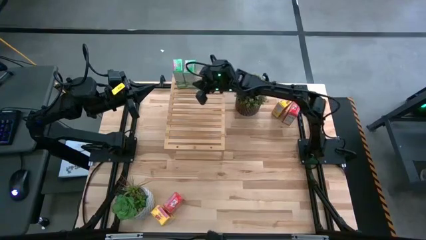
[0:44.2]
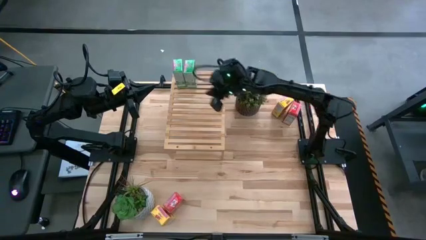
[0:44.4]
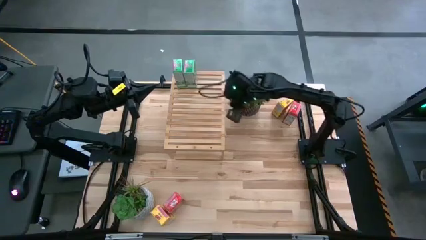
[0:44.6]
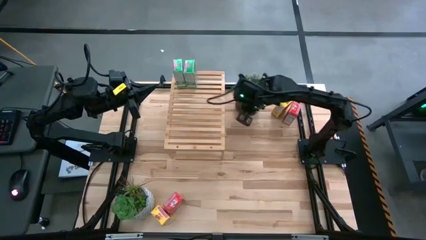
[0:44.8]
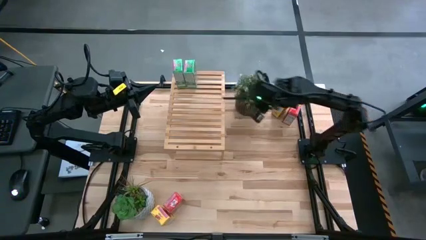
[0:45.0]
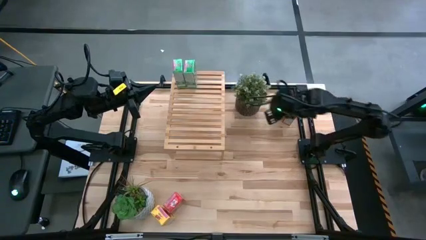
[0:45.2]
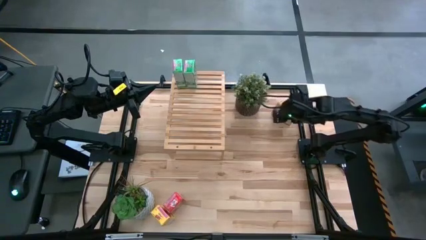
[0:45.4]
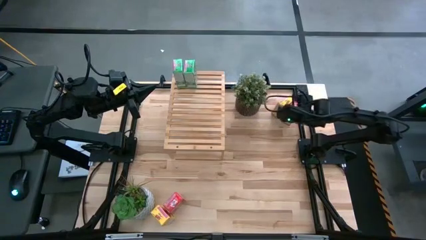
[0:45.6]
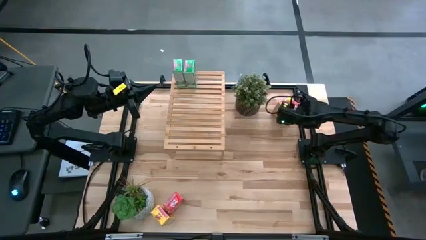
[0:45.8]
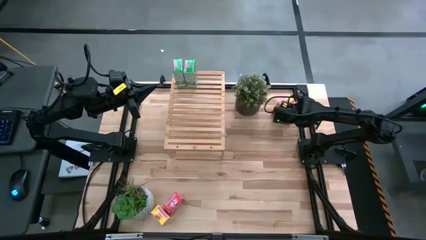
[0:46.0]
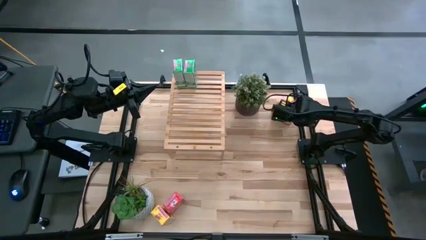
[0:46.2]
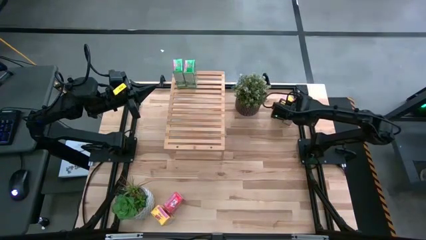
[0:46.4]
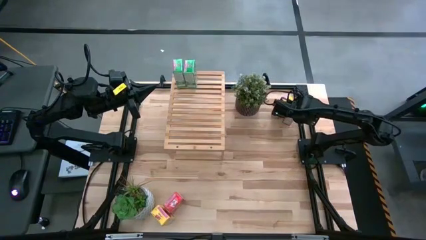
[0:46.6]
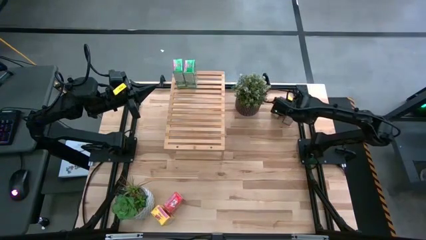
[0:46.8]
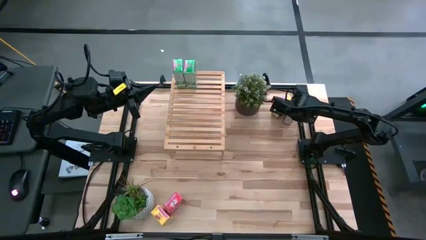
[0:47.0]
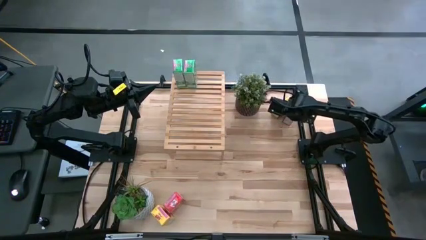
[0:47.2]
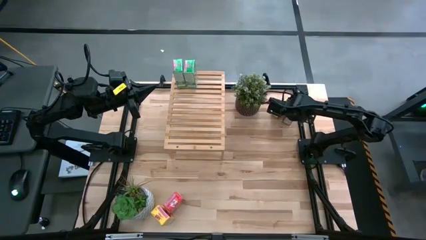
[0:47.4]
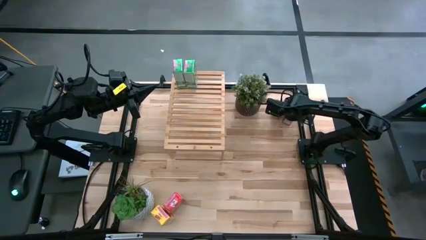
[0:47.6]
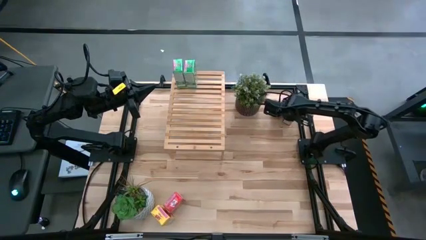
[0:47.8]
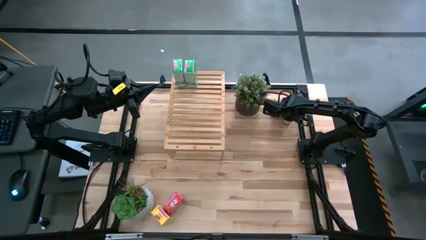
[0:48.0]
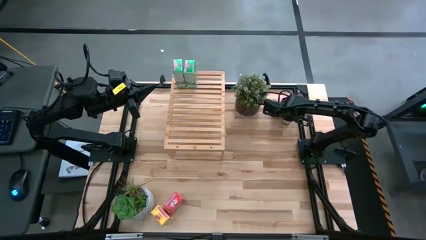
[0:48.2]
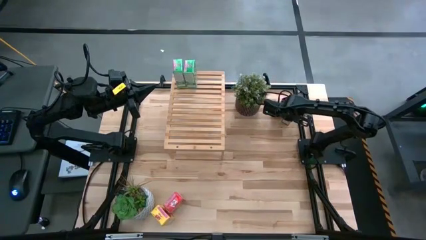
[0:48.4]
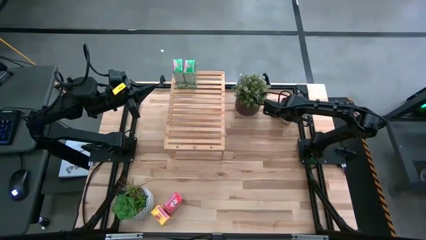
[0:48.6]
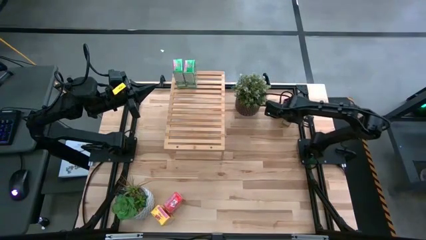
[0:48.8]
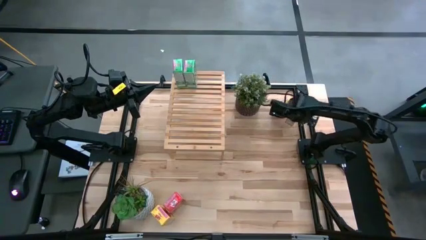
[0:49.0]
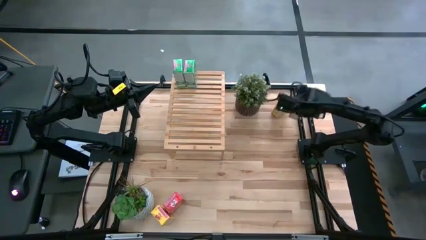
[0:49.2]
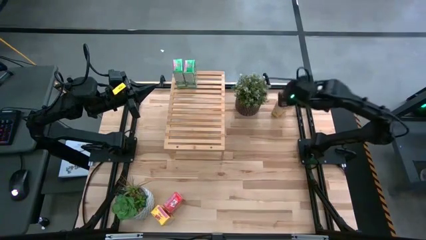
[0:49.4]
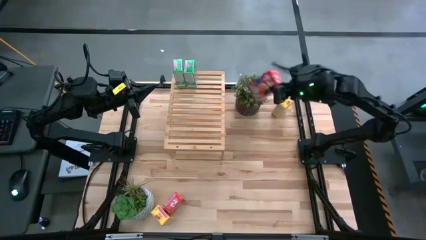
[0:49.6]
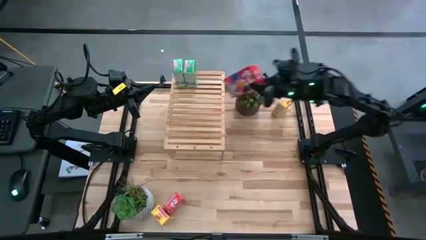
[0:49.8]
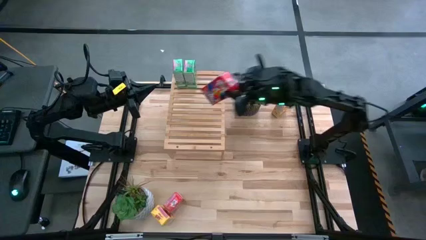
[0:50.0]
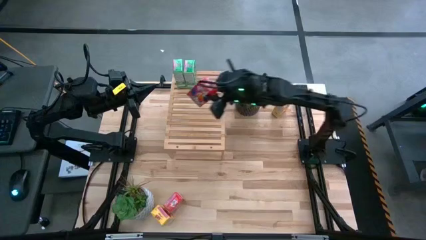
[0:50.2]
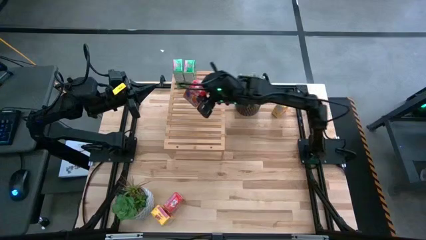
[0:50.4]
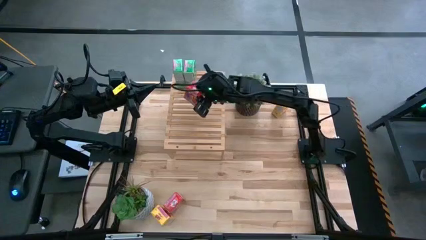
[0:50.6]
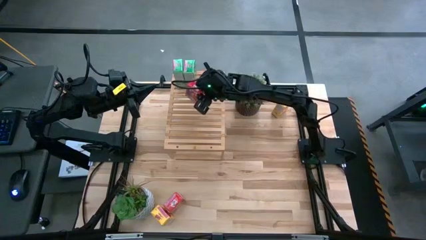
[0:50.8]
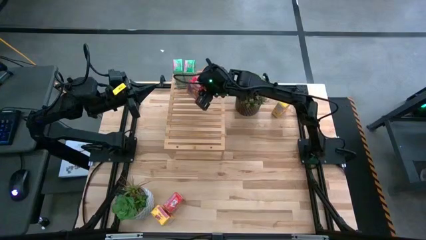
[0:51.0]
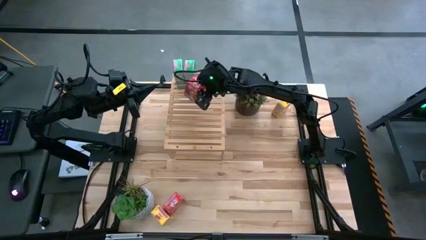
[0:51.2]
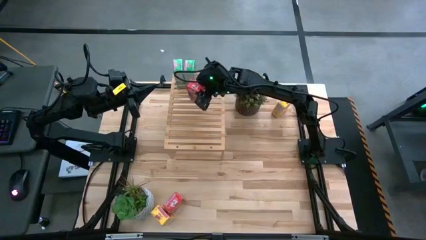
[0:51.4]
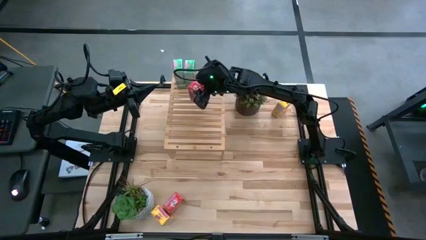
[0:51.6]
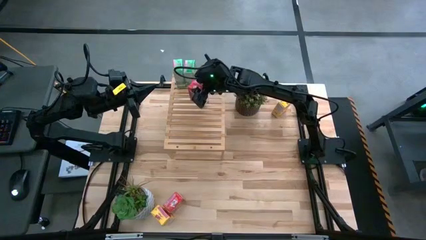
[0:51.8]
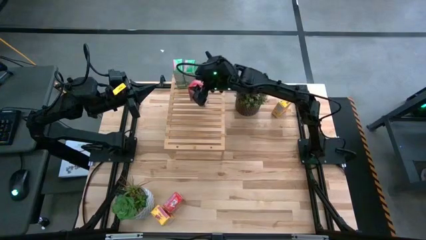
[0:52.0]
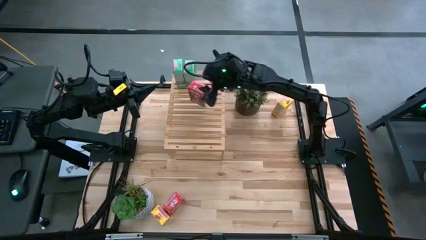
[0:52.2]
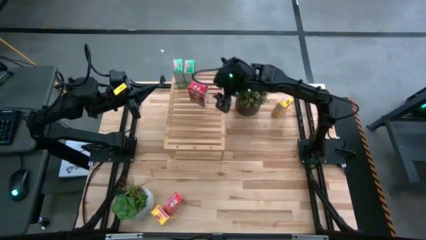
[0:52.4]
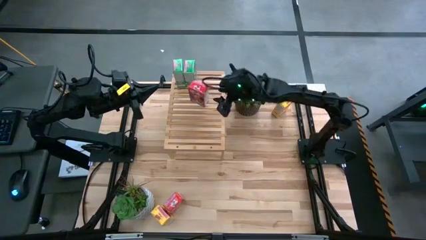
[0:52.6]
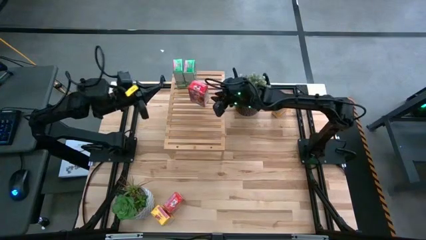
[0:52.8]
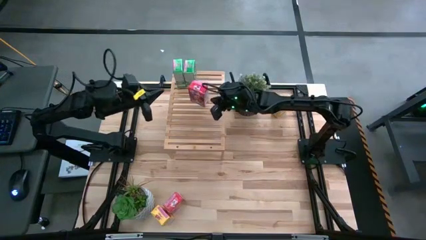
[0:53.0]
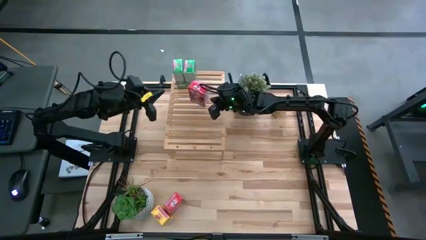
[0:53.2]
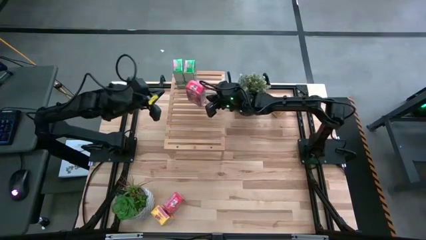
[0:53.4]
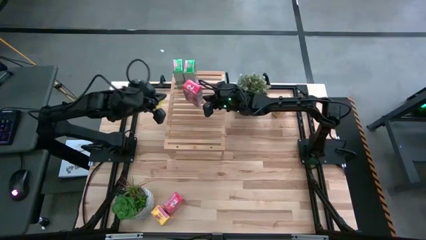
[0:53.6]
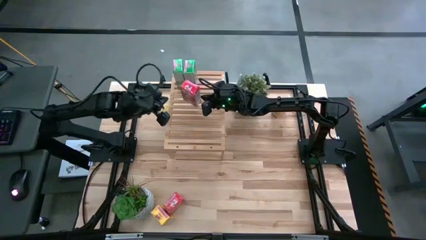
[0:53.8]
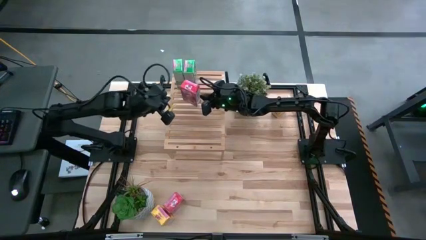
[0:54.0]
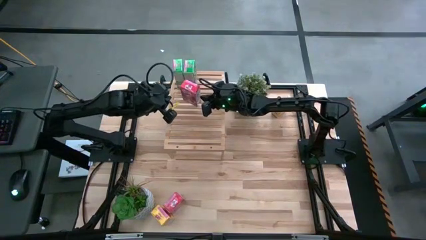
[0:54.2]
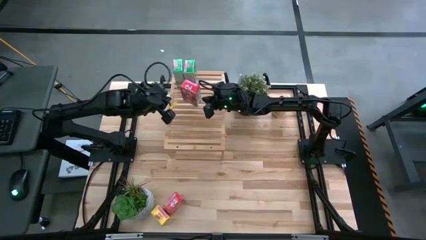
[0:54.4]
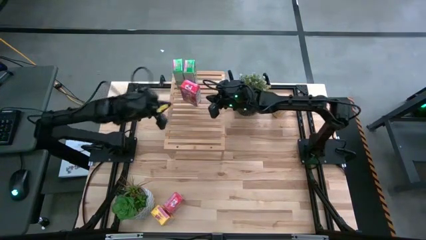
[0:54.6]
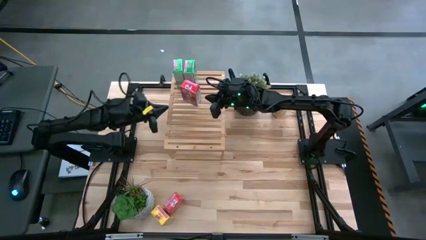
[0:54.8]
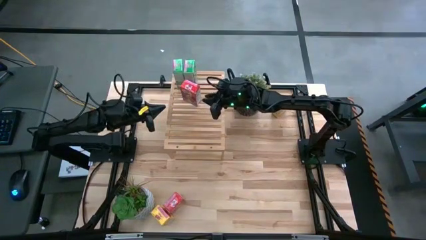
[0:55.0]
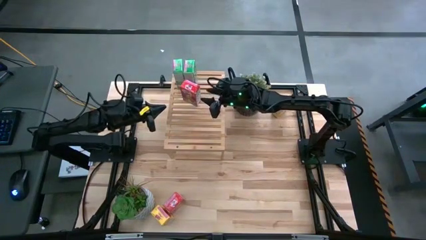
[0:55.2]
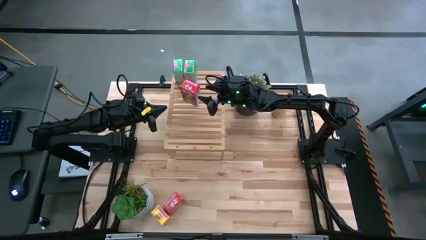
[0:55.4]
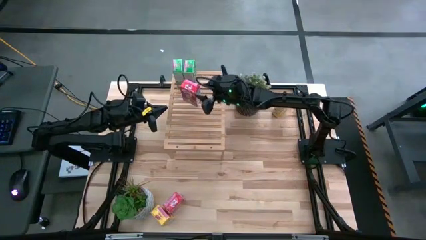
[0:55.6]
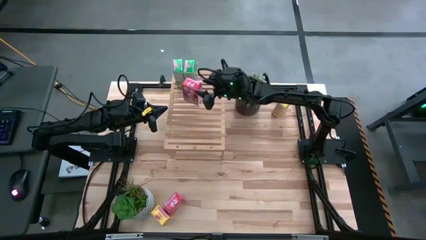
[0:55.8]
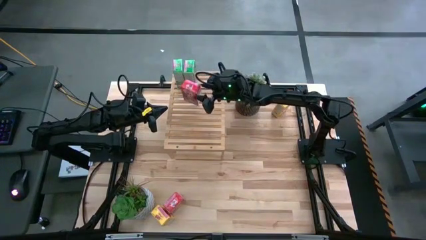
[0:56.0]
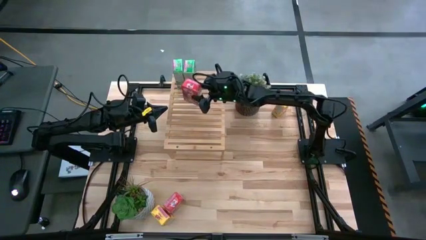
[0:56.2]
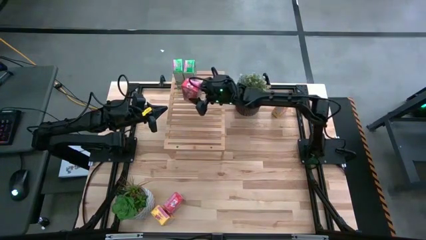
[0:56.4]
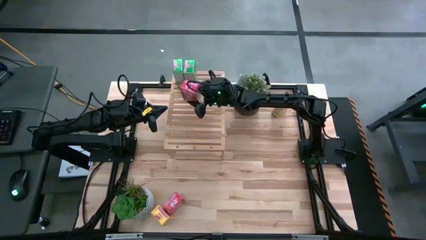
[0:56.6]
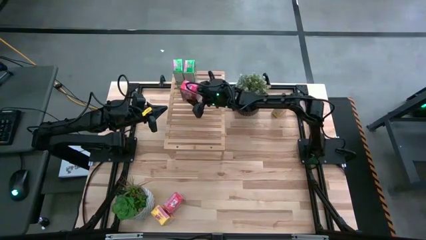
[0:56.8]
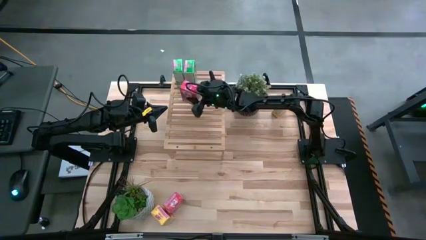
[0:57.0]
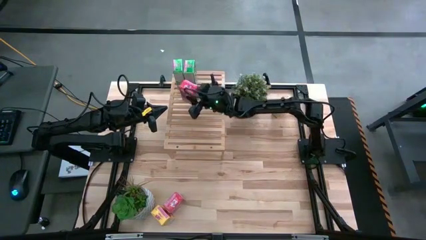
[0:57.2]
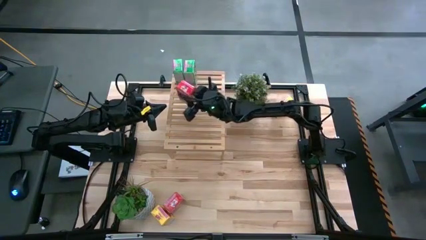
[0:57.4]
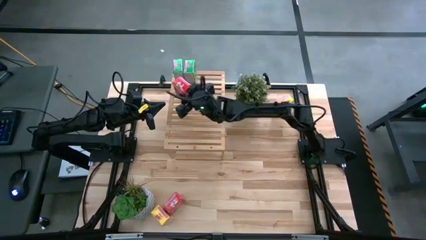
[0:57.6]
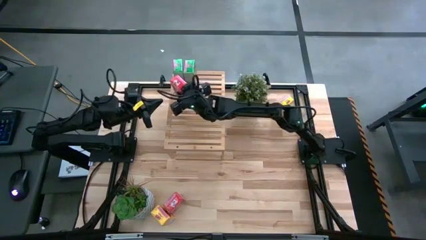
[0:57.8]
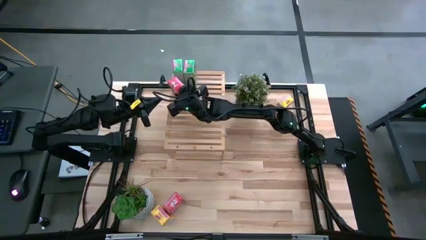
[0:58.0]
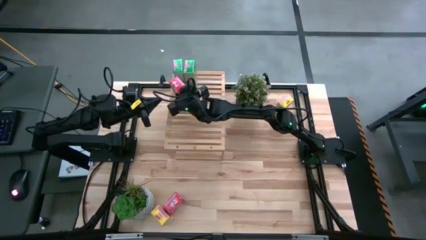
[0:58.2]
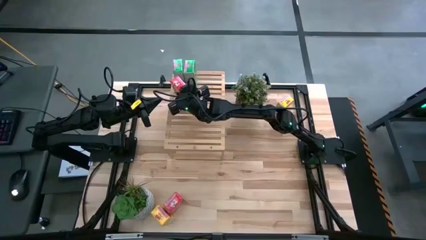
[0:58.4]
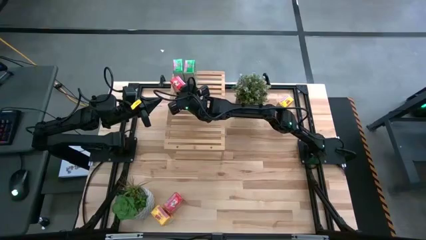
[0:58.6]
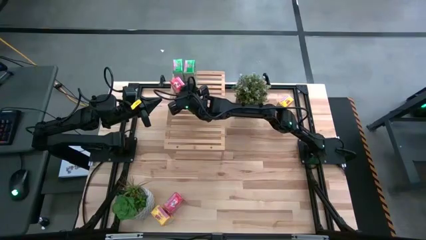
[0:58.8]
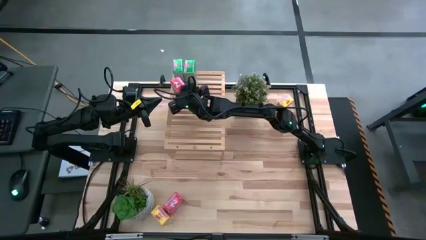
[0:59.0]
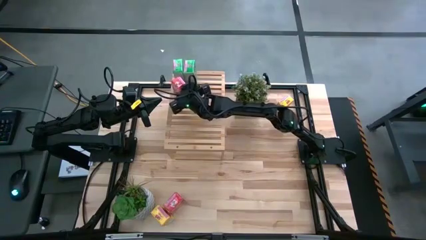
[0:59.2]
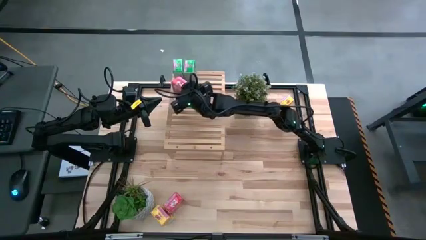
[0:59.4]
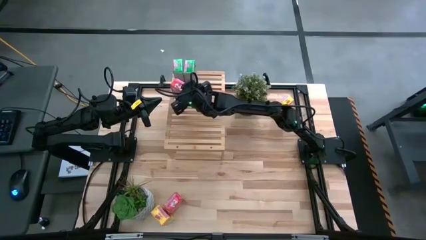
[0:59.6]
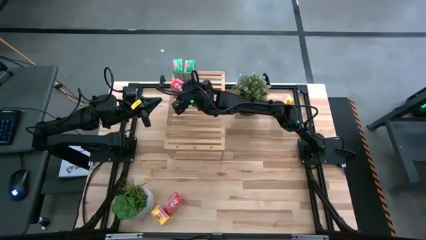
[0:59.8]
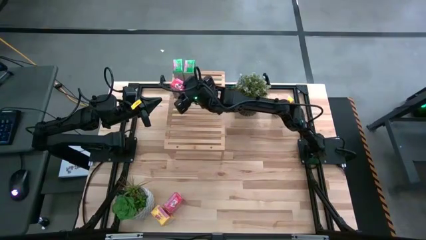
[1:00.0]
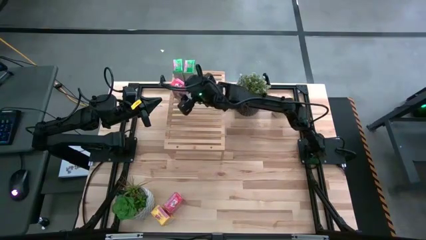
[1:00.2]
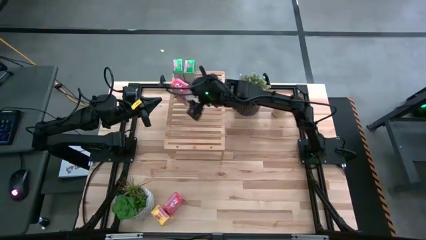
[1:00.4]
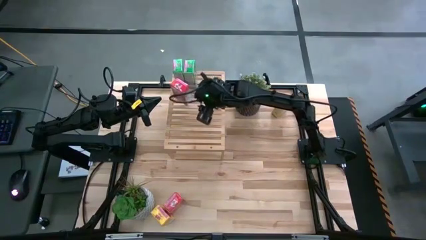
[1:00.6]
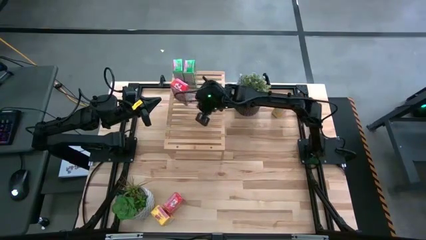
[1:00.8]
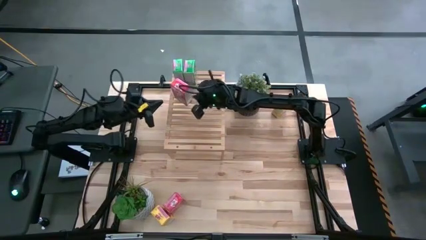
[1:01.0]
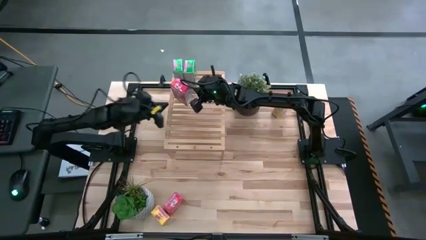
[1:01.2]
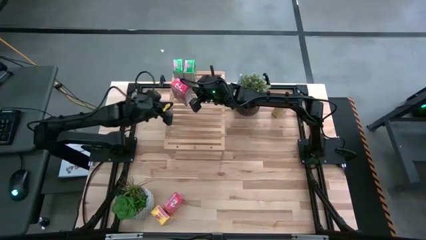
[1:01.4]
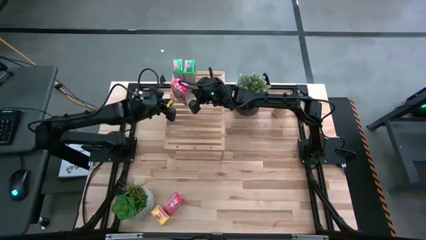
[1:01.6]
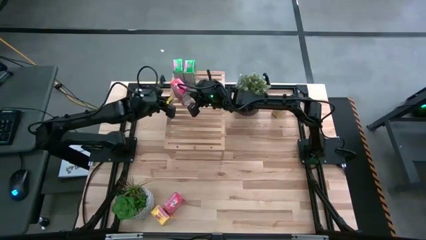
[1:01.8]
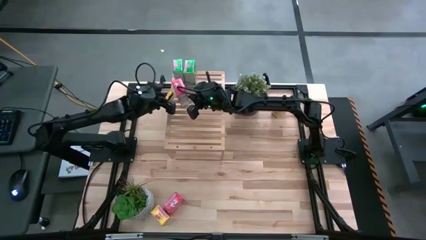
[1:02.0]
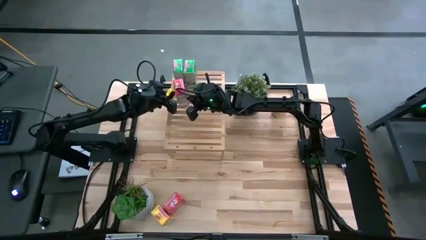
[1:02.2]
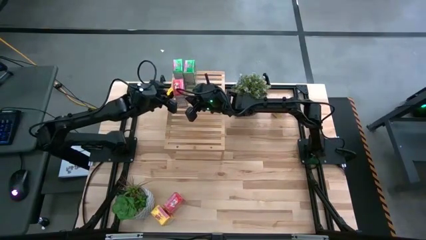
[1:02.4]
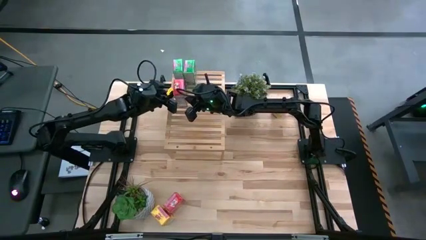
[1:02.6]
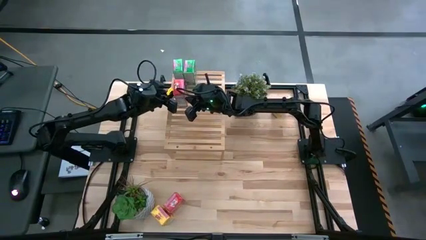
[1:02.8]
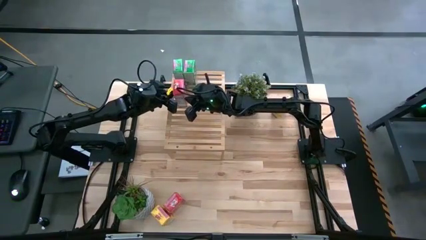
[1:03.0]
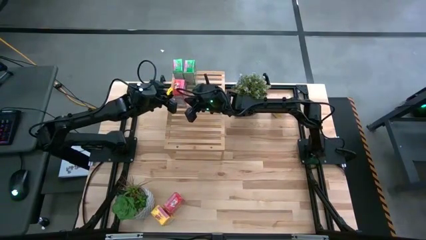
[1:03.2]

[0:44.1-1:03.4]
Task: Stack cereal on shelf
Put the top red cereal box on the shelf
